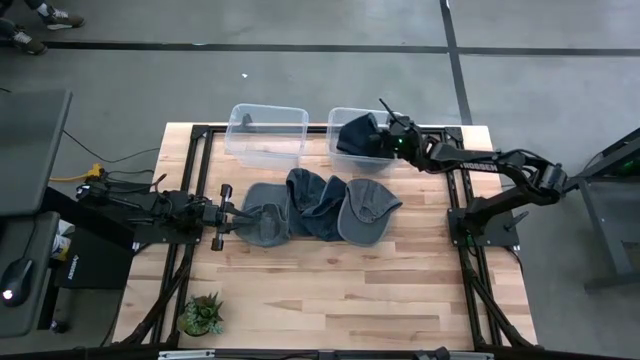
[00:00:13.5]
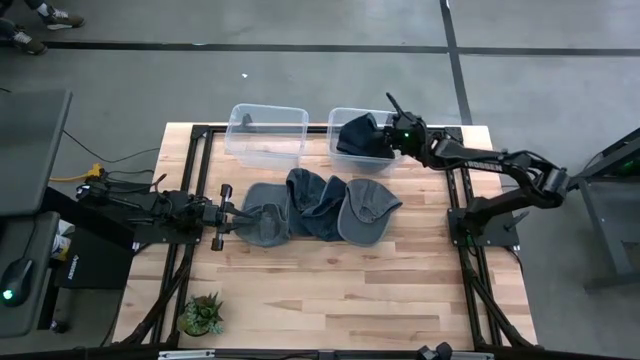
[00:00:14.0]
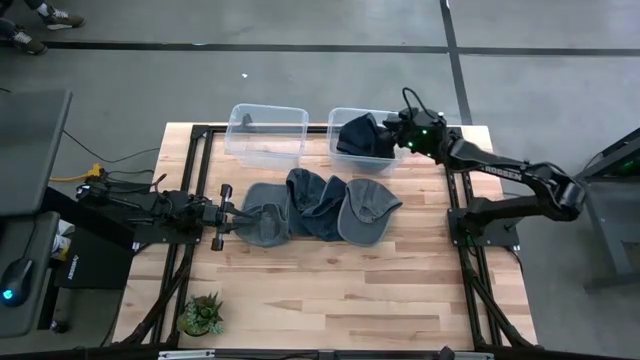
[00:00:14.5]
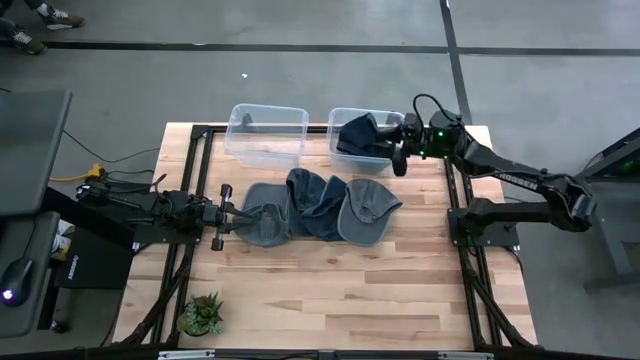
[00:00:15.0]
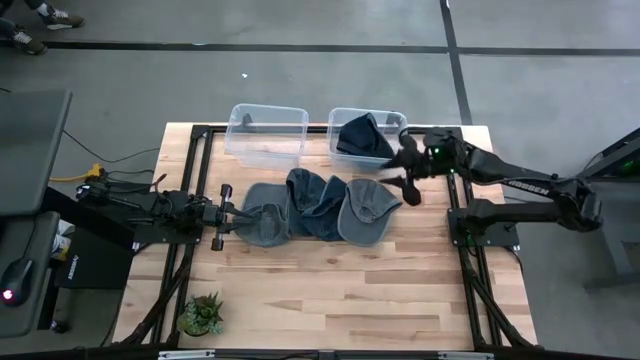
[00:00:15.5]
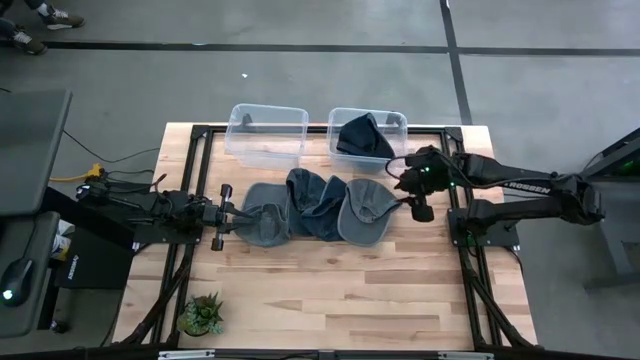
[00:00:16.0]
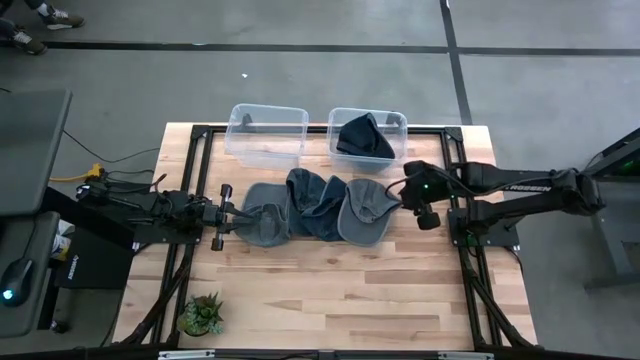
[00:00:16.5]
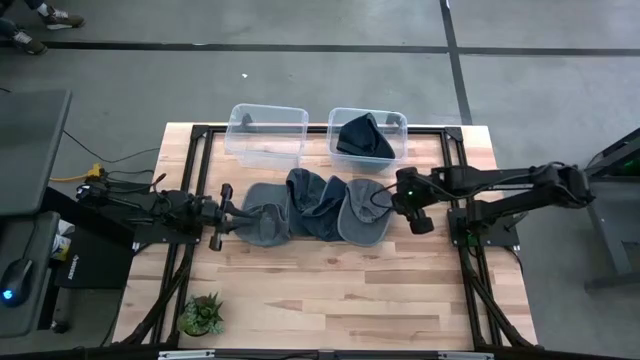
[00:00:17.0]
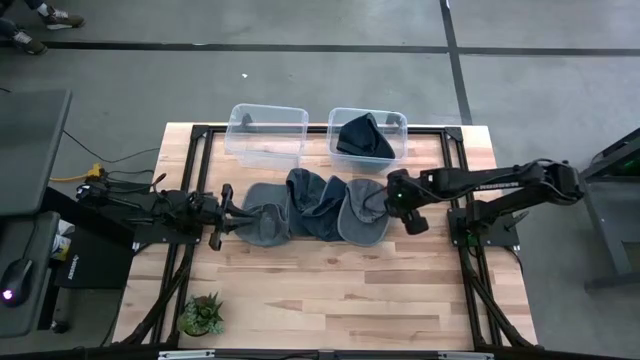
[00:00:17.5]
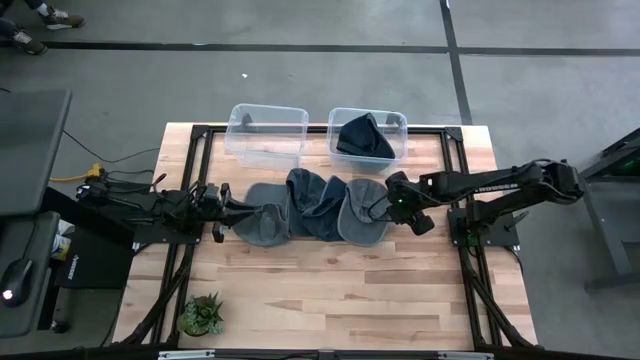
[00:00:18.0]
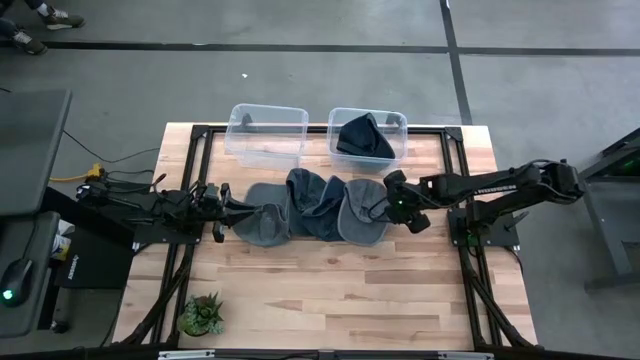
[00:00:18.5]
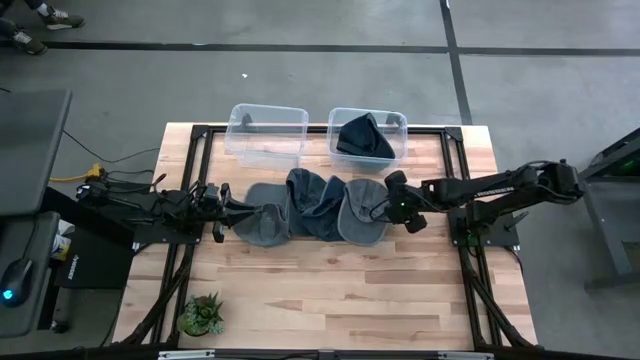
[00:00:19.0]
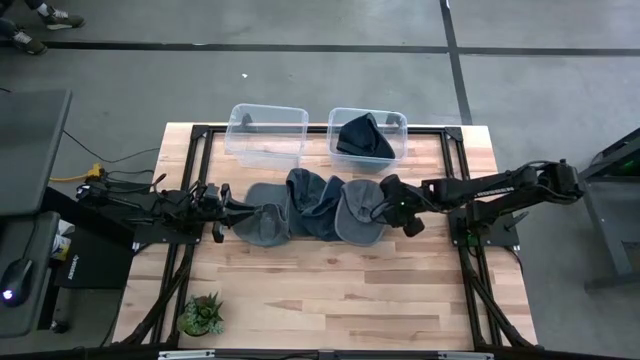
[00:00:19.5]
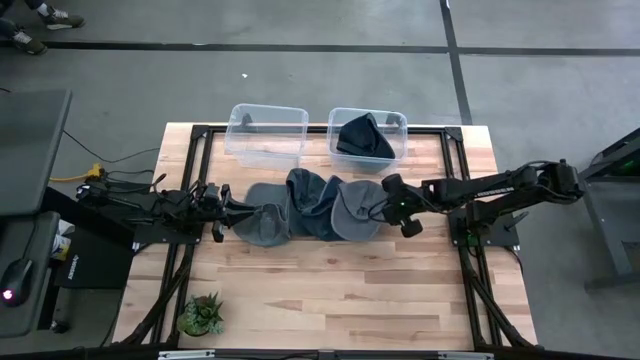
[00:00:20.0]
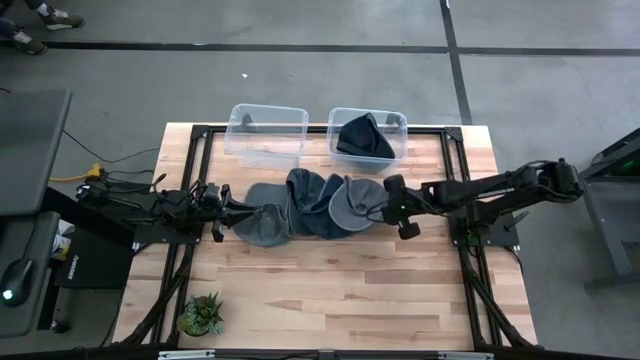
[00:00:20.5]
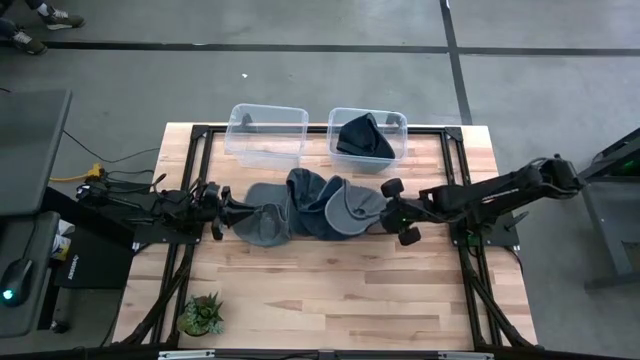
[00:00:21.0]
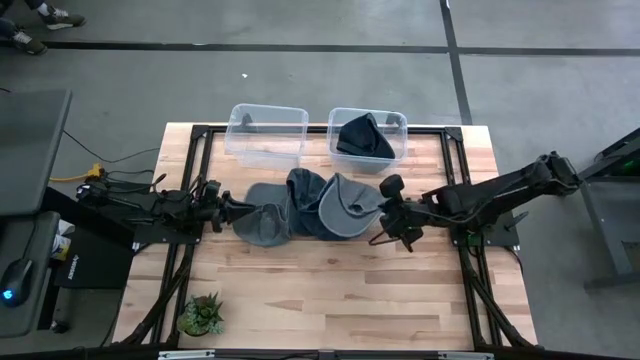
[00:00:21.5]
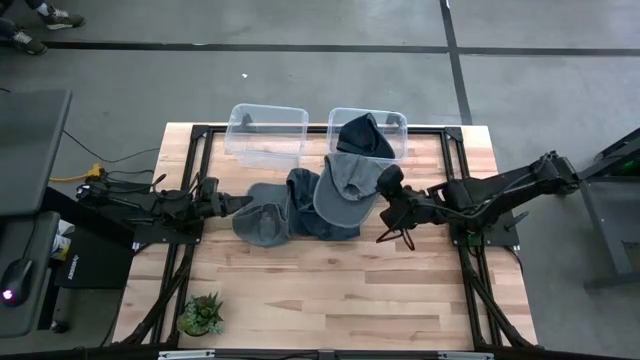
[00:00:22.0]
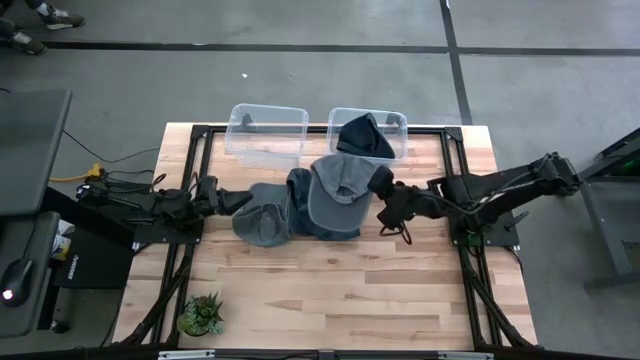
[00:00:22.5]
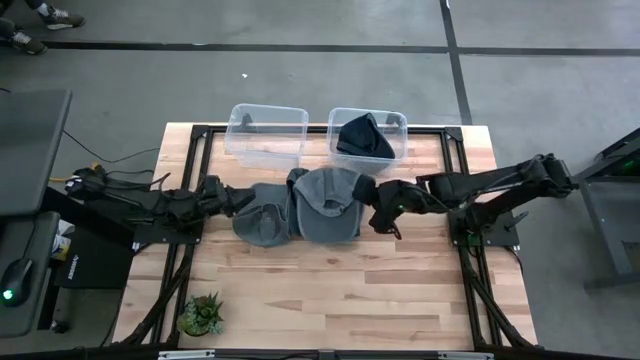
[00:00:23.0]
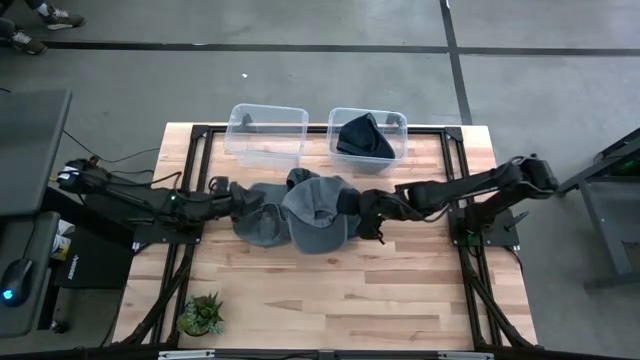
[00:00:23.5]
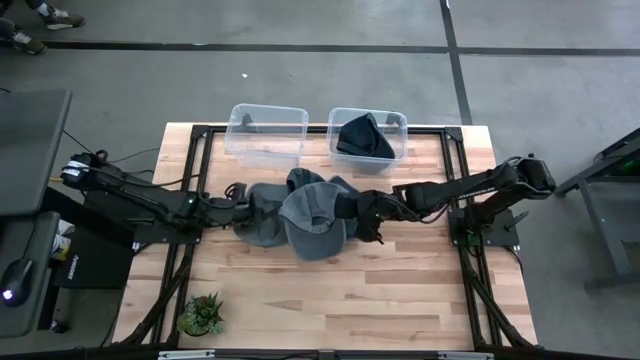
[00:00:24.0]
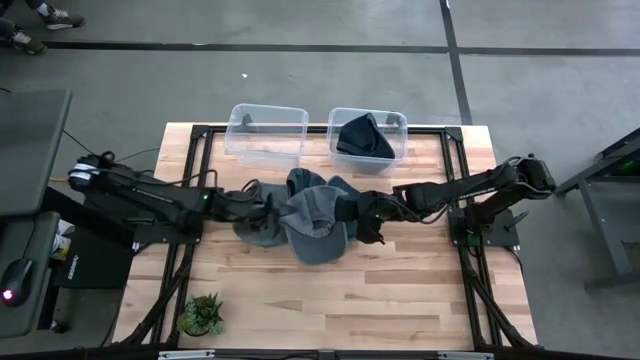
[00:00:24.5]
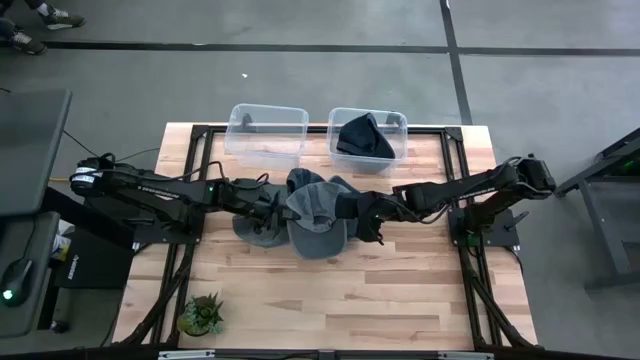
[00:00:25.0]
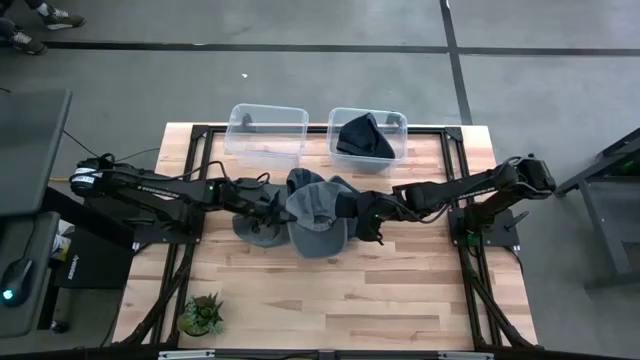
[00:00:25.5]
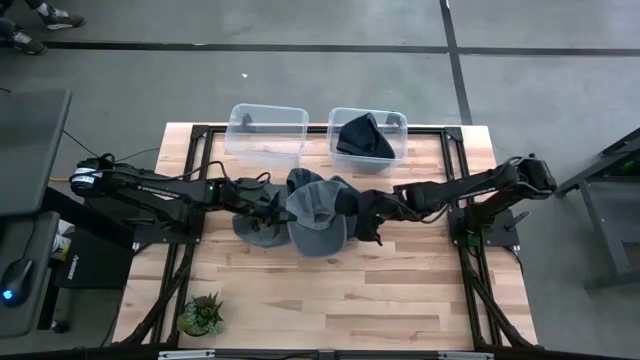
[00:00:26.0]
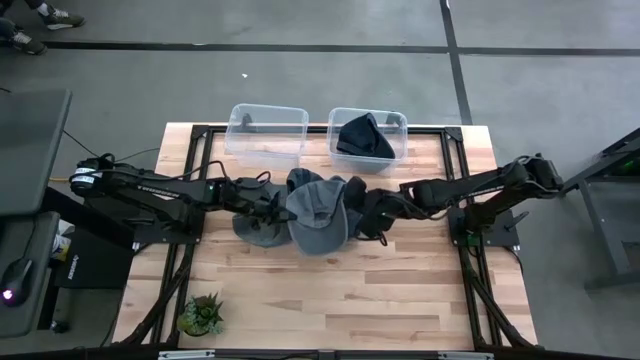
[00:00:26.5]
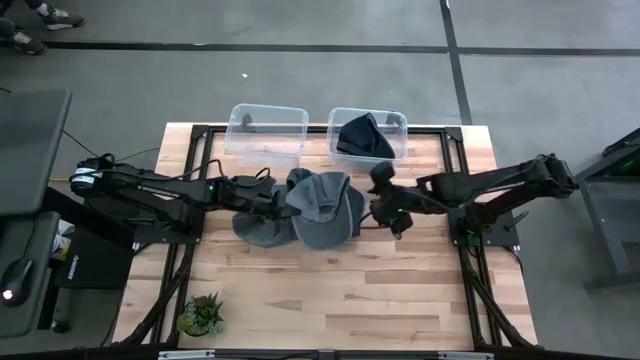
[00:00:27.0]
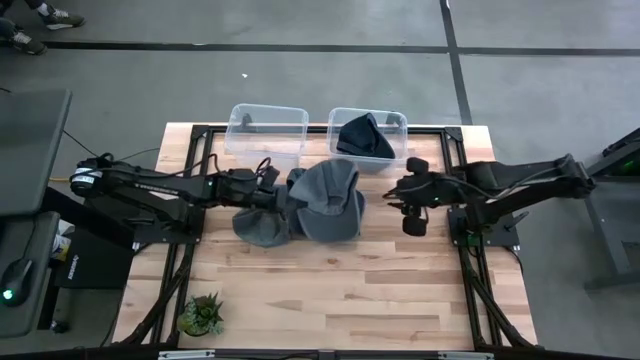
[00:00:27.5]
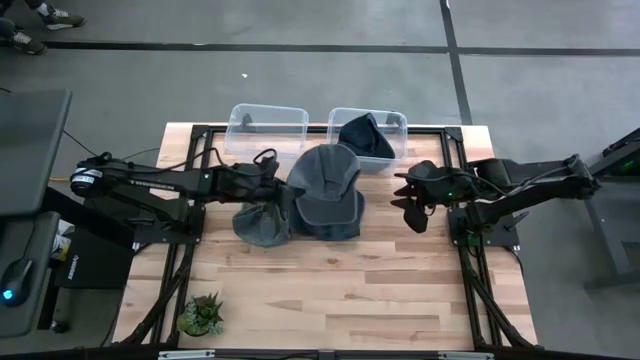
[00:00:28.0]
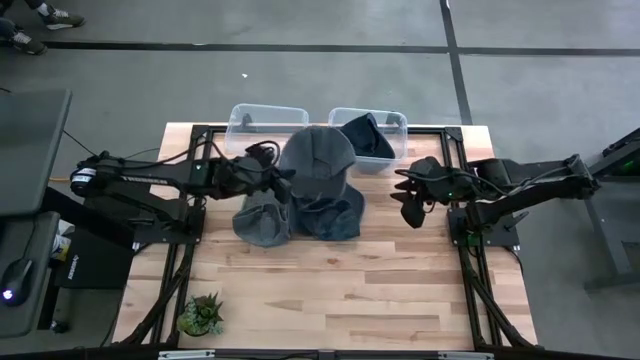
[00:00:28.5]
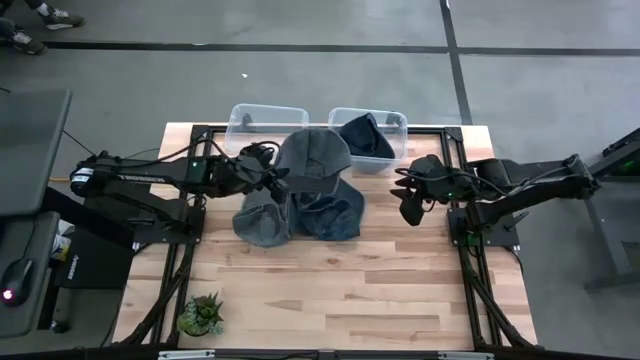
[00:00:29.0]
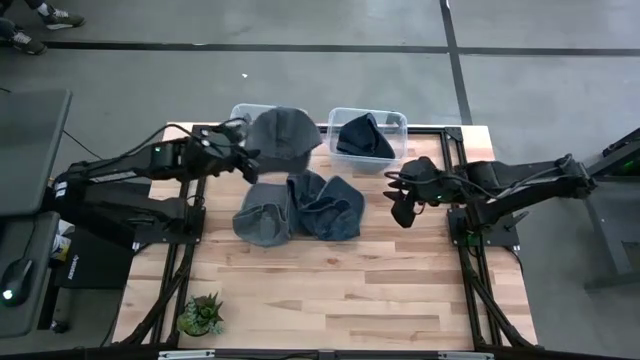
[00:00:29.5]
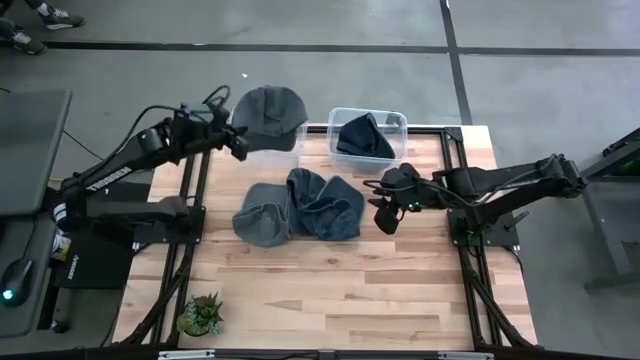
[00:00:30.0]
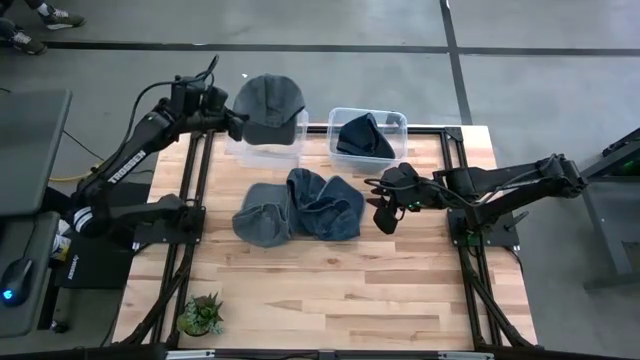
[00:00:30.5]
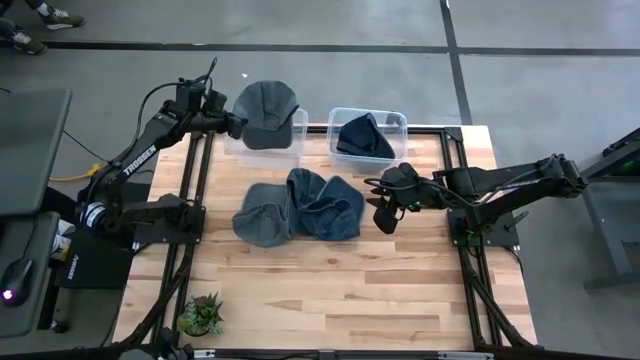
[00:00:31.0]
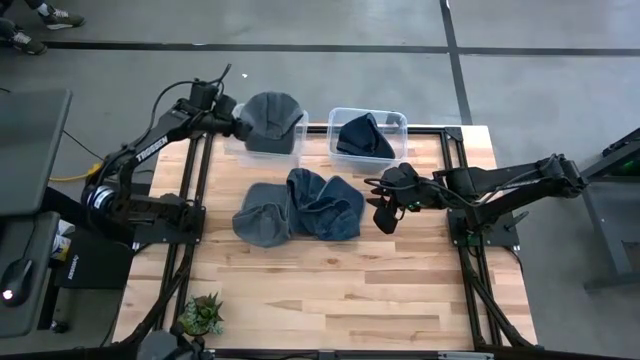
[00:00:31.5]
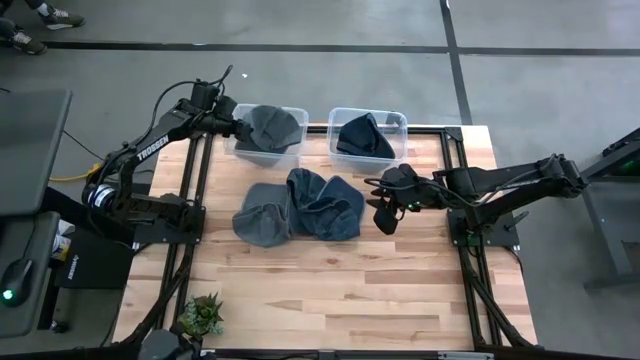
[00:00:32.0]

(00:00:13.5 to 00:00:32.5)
Task: Pick & Place hat
Put the right gray cap into the left transparent bin
